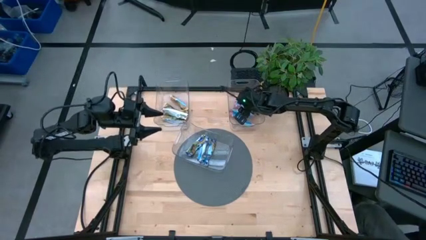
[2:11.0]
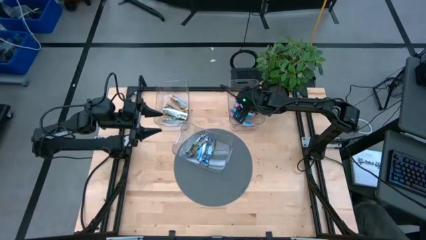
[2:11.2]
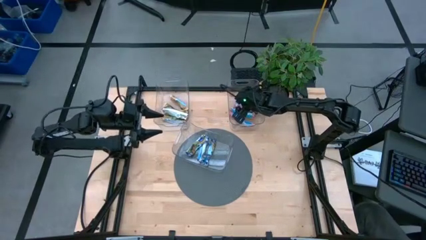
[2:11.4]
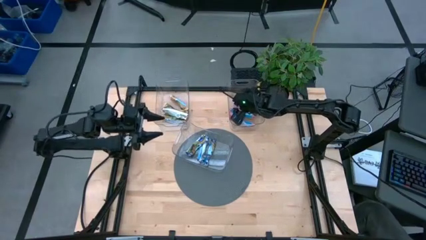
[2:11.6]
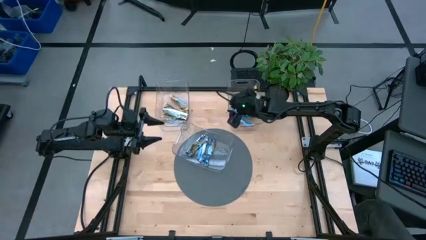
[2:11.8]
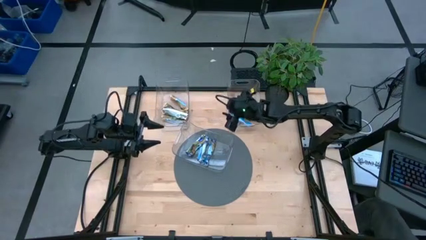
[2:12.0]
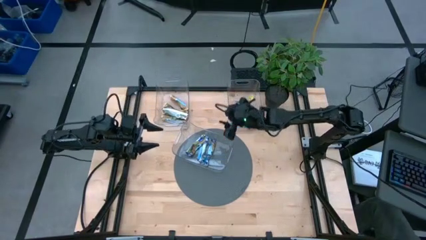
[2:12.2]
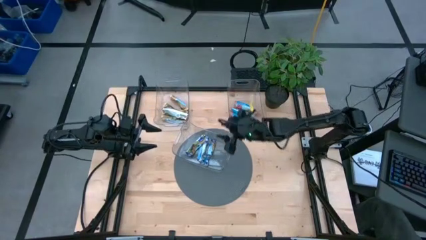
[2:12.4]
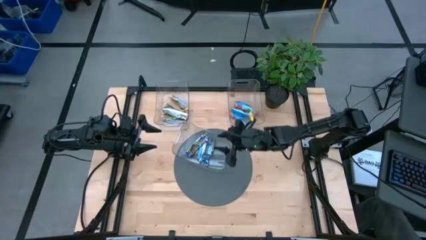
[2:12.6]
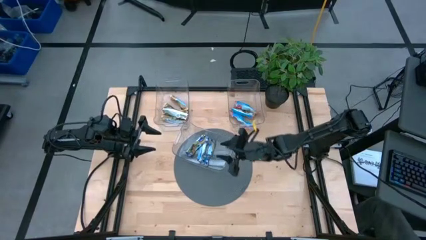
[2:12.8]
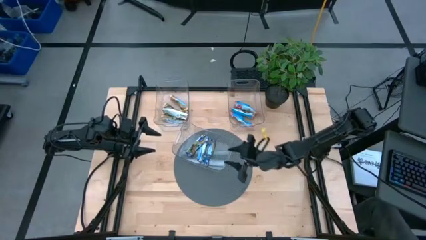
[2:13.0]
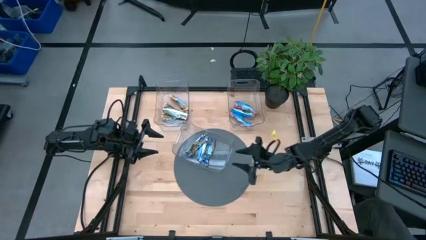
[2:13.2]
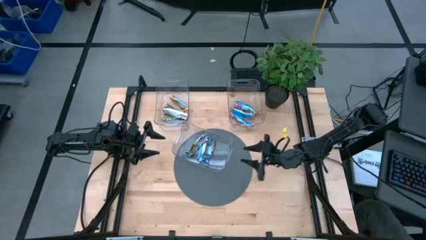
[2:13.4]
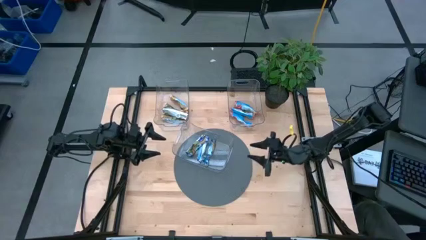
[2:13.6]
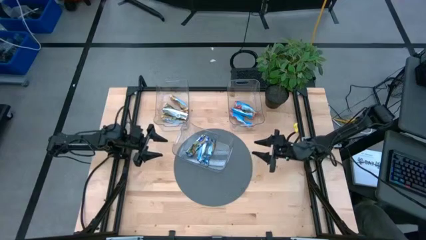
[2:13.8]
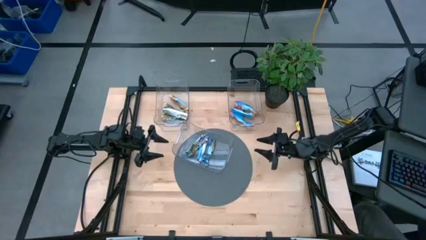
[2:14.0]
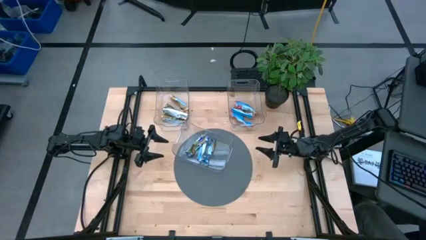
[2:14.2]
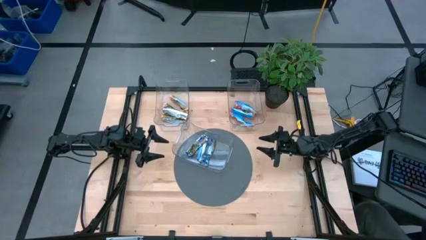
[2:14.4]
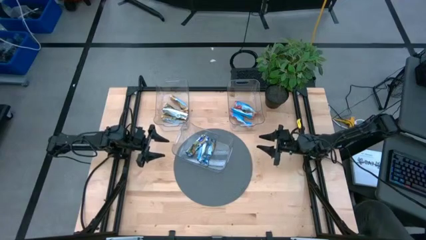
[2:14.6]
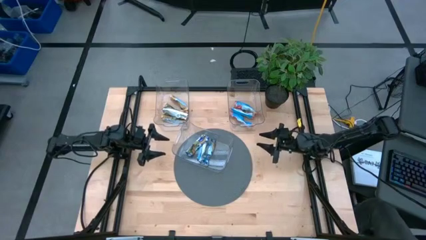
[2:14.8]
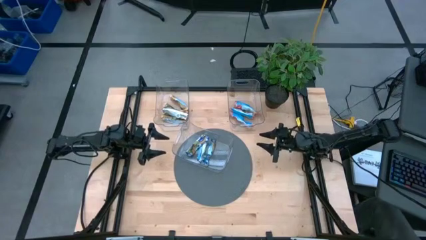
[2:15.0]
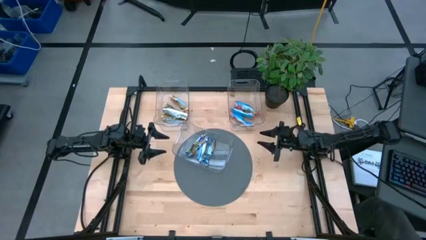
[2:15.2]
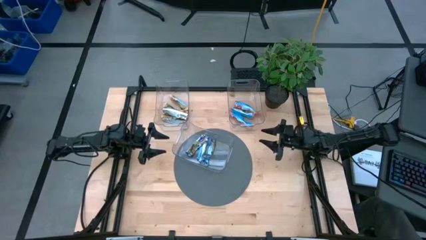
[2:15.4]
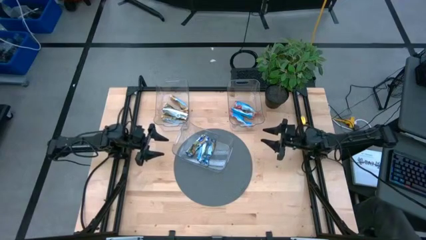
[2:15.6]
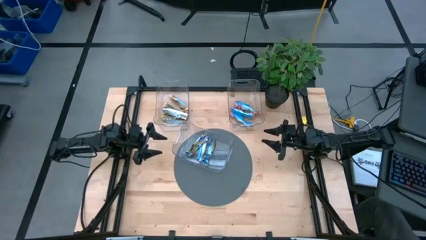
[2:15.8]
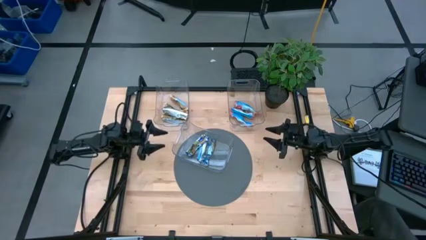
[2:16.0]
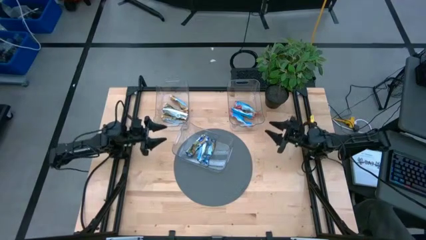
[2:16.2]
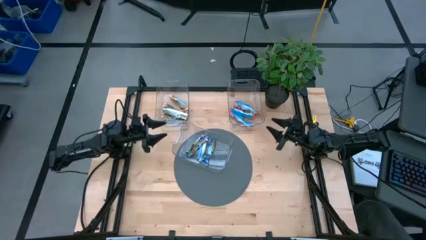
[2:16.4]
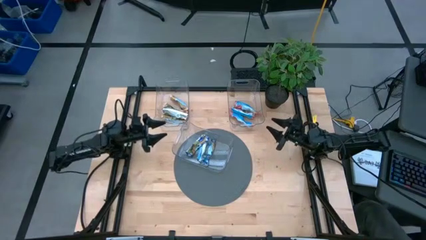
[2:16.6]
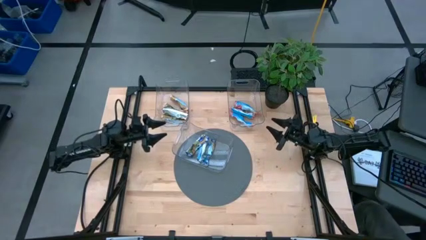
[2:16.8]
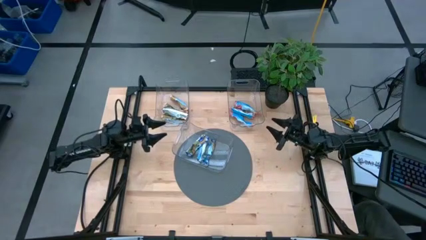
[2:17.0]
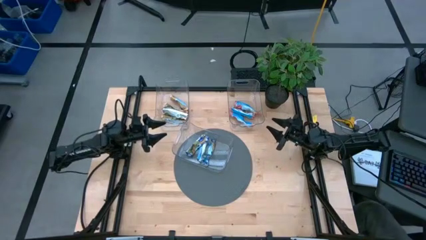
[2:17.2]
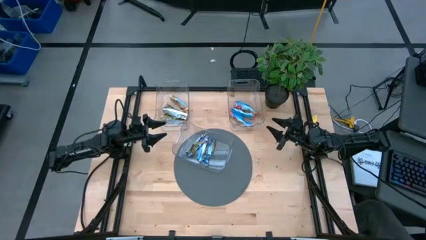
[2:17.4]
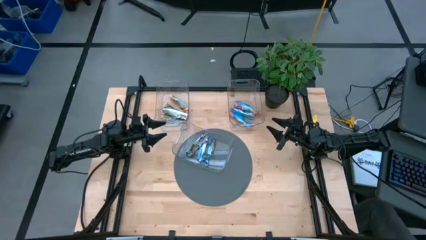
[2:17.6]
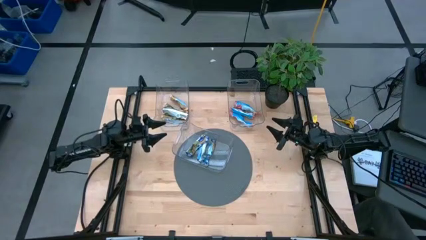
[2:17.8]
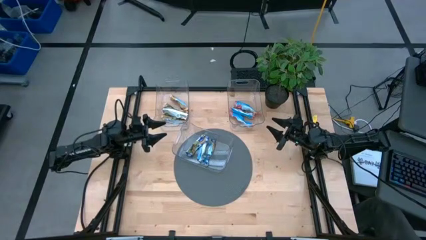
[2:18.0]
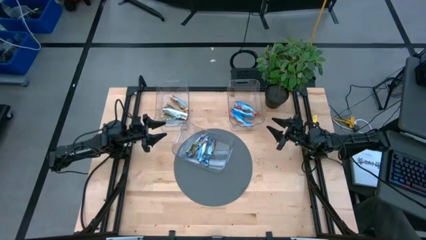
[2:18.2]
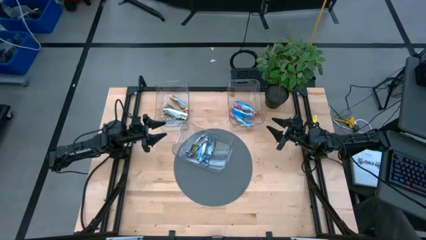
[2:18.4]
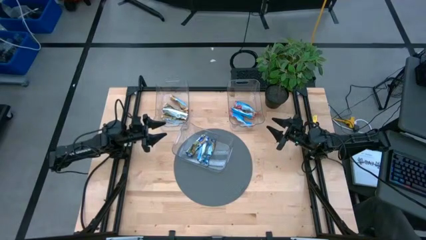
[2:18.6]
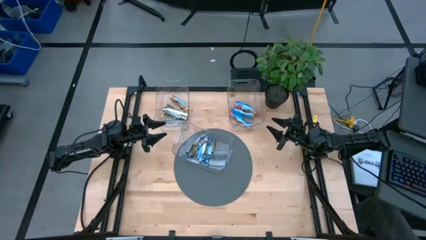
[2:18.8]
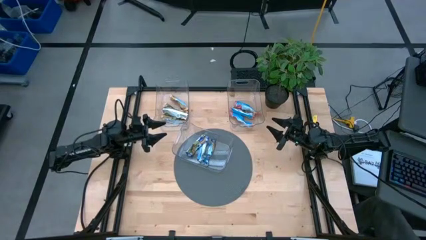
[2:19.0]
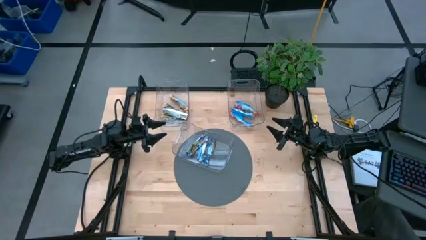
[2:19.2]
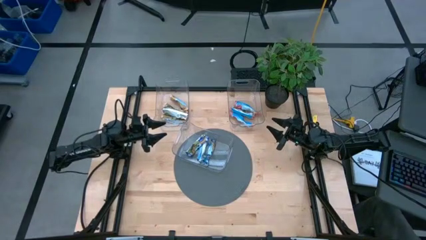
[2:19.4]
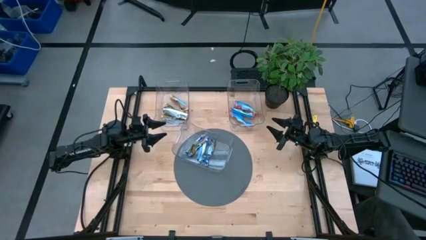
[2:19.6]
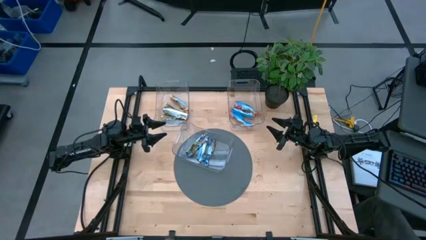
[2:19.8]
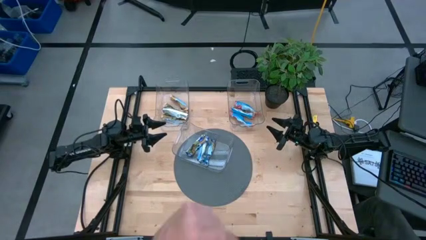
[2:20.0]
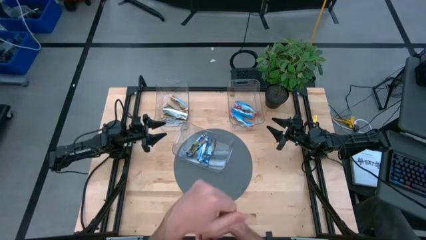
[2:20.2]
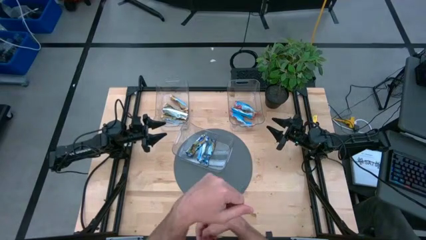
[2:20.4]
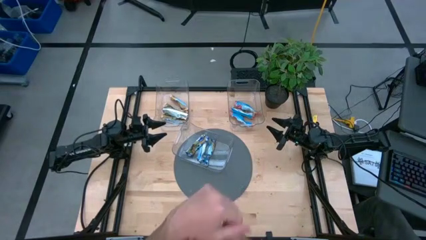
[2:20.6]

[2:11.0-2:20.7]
Task: Pick and place Granola Bars by type
Return to Home Position

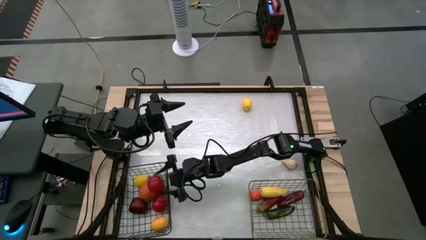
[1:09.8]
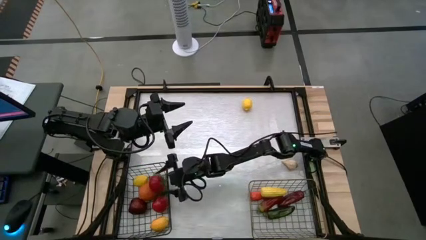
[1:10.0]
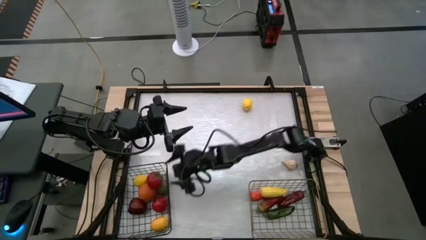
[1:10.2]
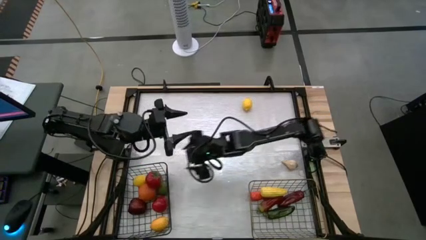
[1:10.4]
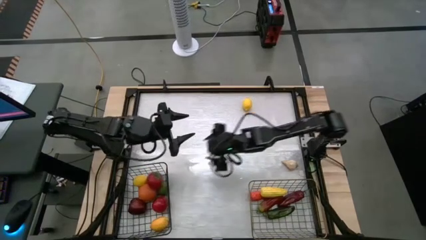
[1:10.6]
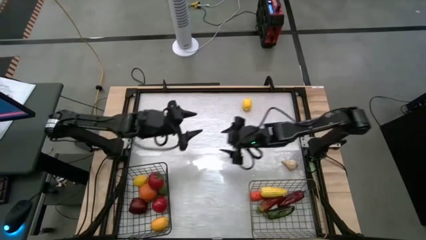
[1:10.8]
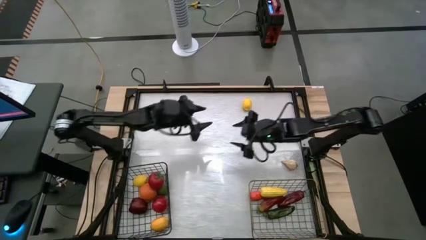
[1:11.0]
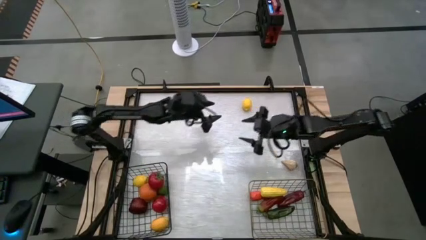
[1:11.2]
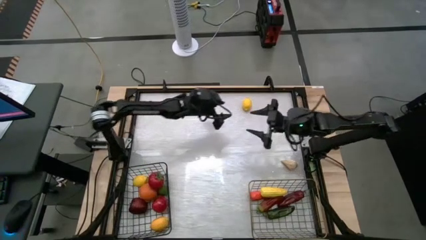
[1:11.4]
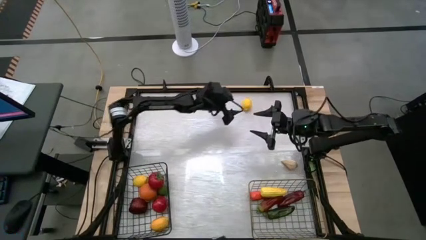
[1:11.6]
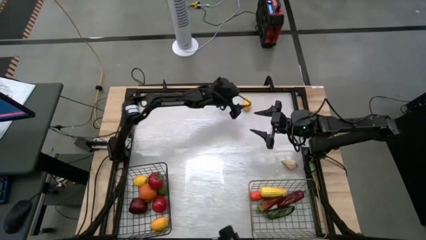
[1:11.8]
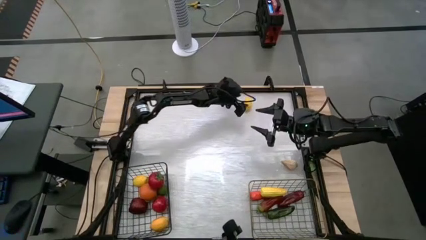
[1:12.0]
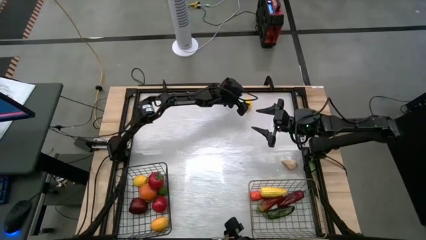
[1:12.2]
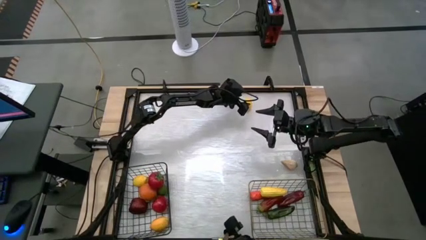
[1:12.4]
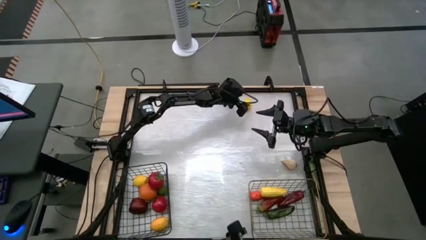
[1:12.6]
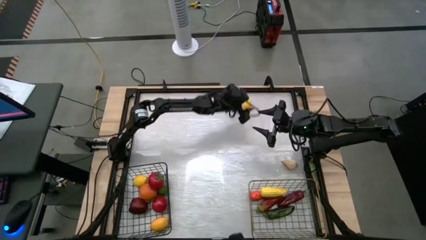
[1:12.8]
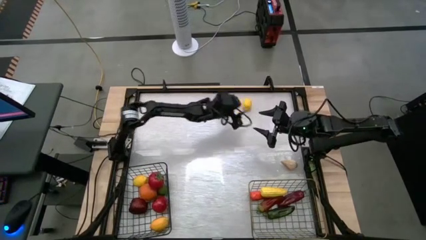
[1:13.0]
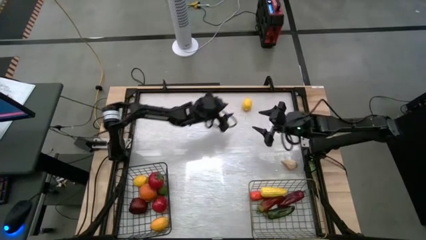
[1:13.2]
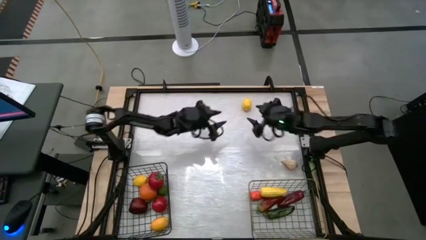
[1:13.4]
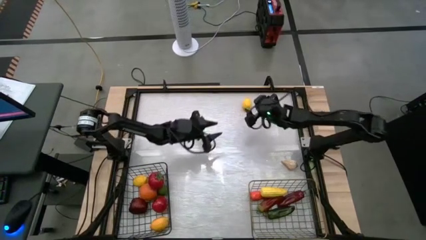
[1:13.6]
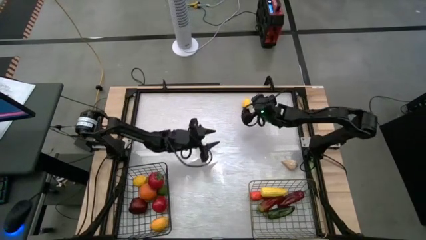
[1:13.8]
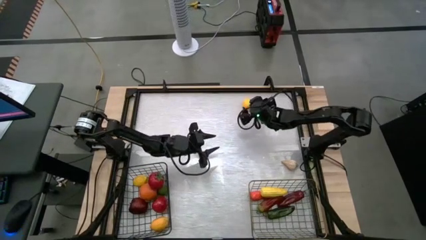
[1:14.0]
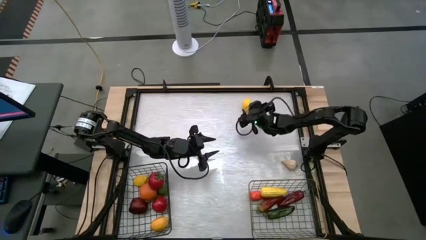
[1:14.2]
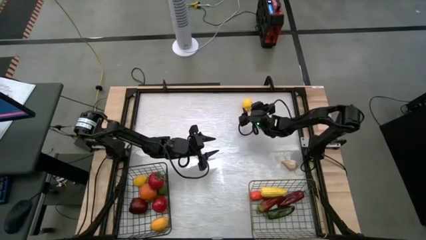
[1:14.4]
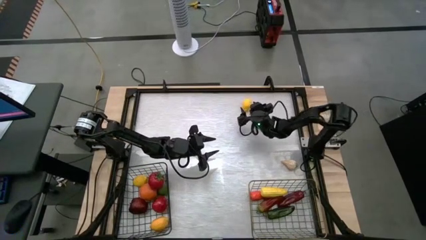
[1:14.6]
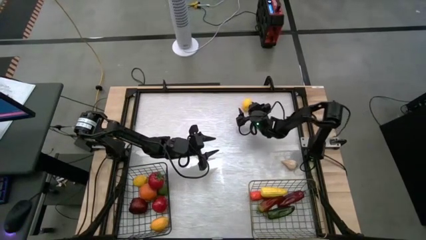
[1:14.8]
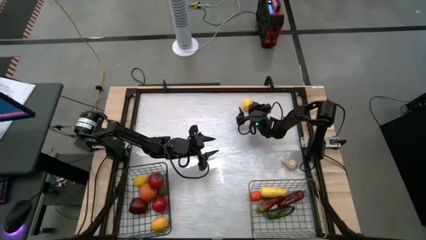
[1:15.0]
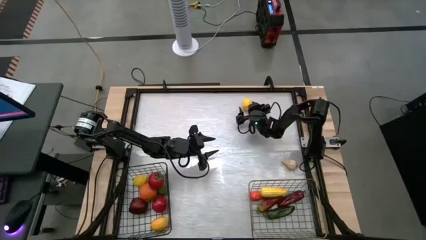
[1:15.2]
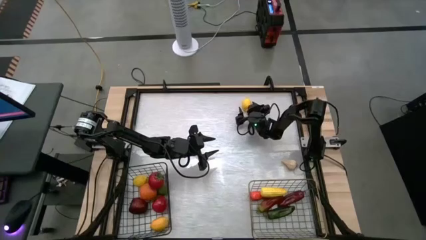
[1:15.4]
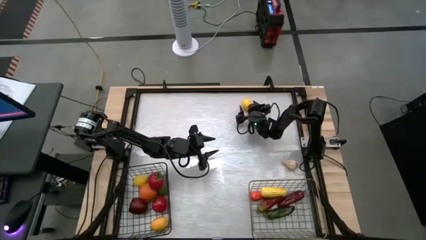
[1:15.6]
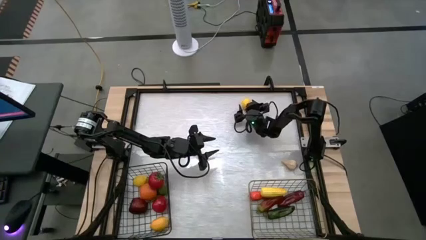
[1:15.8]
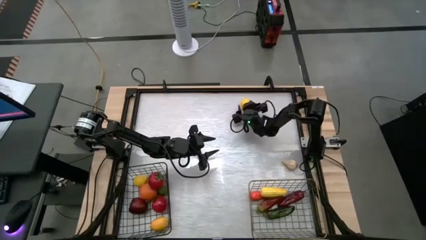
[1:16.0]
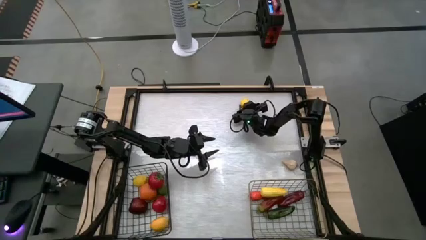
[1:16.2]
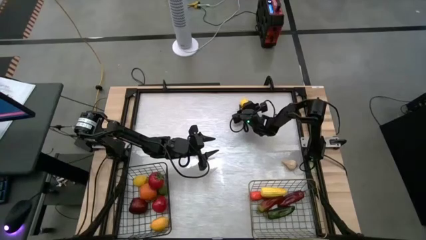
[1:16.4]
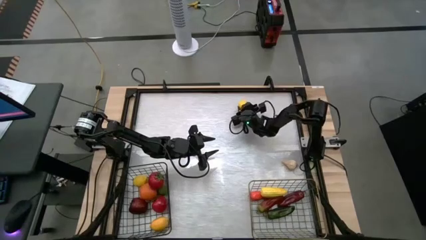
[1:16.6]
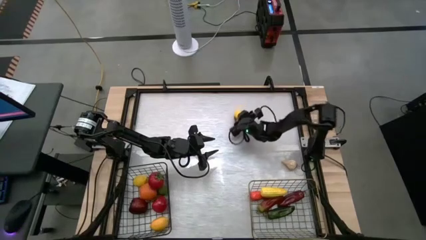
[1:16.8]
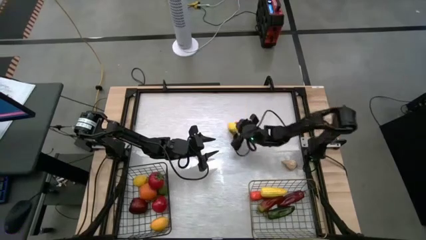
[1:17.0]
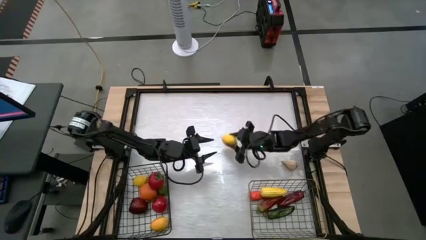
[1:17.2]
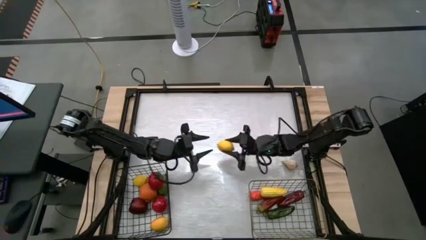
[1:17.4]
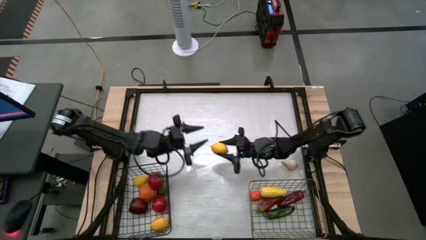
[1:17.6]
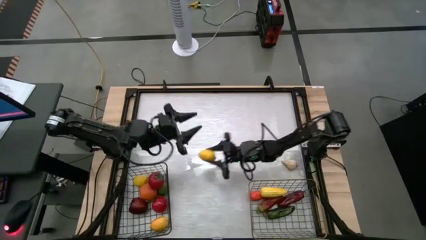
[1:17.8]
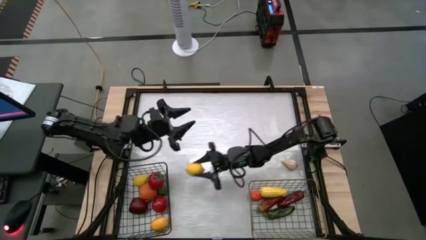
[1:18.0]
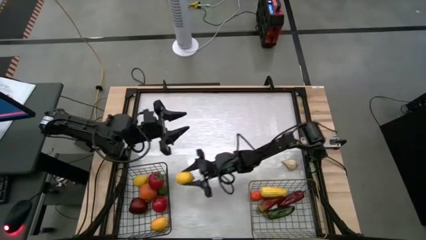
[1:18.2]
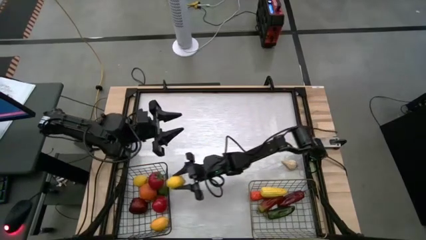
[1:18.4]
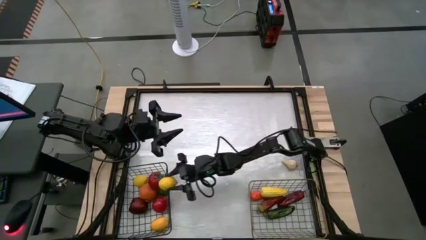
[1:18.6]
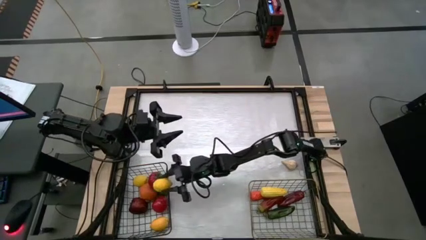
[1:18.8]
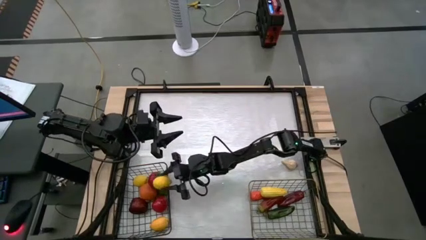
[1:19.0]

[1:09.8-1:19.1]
Task: Sort produce into baskets
Put the lemon into the black wire basket
